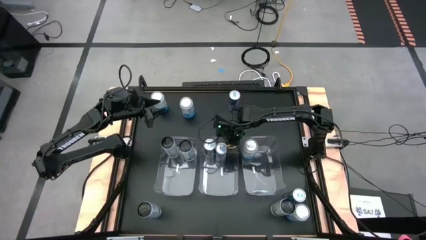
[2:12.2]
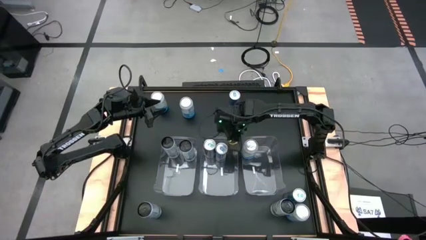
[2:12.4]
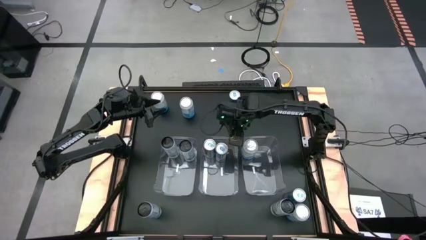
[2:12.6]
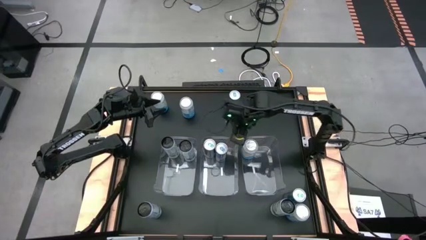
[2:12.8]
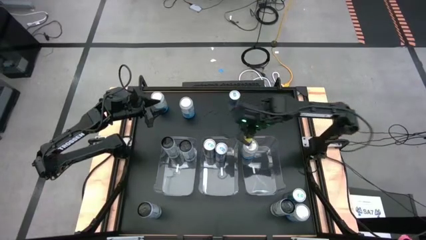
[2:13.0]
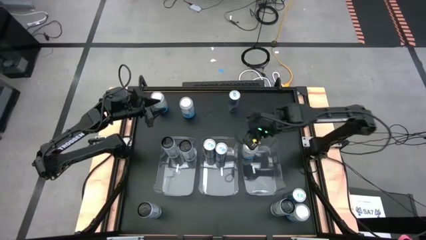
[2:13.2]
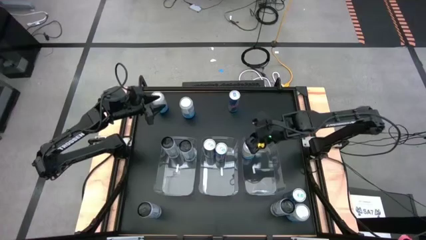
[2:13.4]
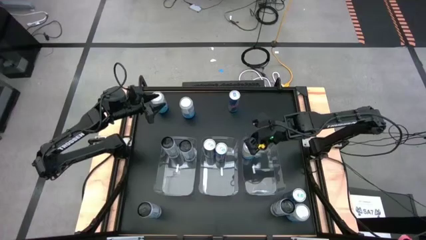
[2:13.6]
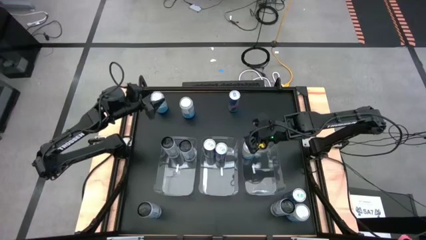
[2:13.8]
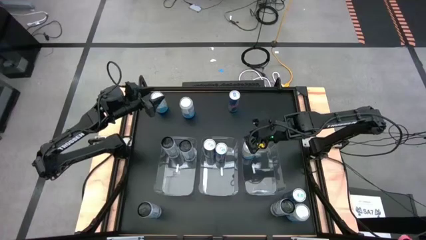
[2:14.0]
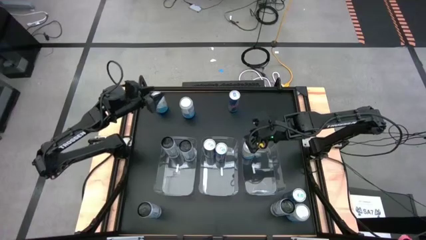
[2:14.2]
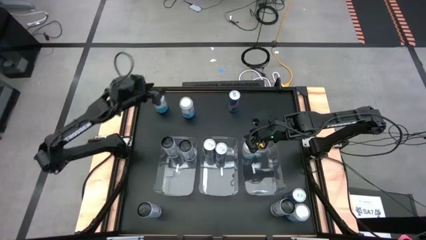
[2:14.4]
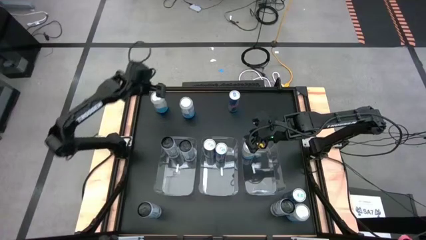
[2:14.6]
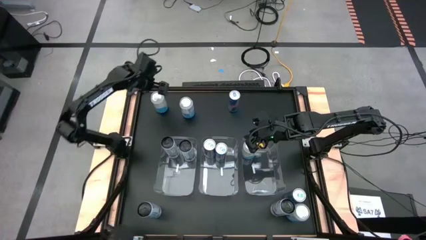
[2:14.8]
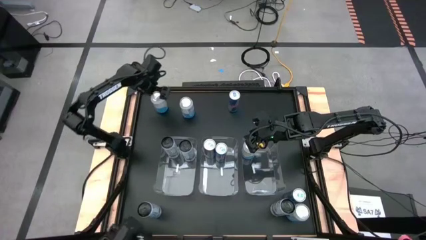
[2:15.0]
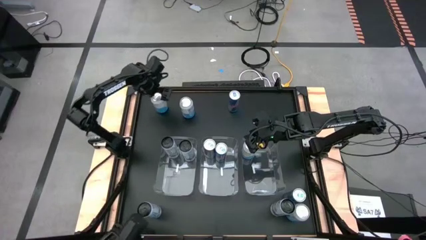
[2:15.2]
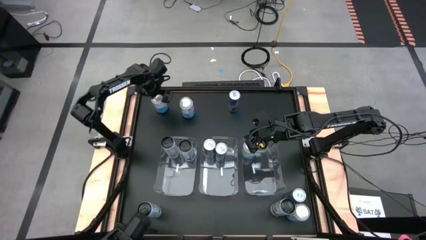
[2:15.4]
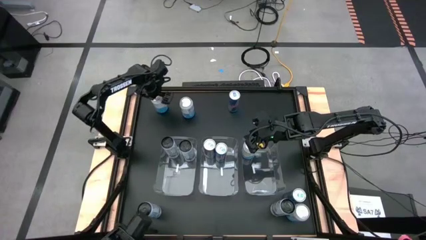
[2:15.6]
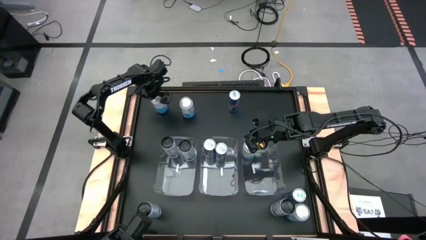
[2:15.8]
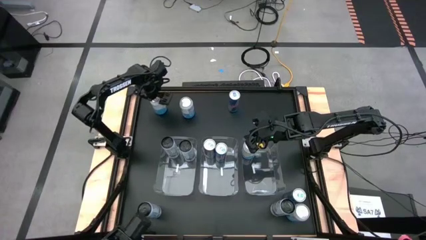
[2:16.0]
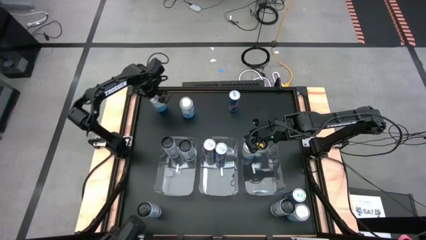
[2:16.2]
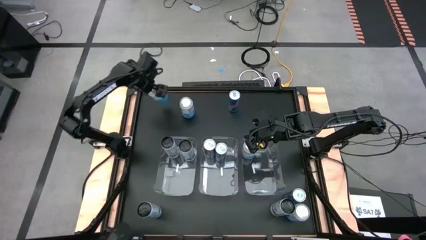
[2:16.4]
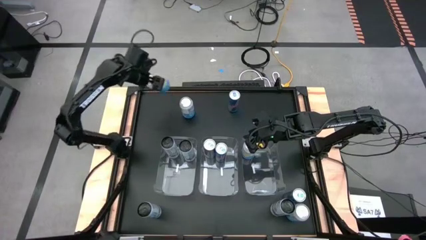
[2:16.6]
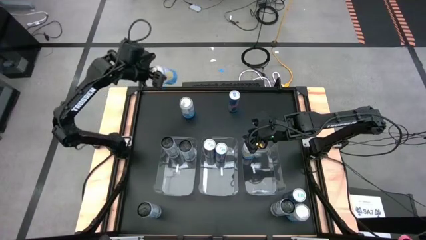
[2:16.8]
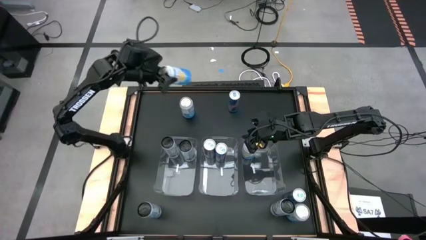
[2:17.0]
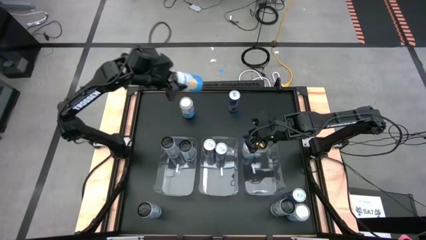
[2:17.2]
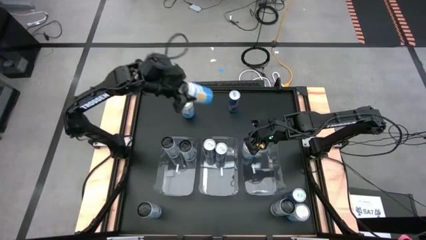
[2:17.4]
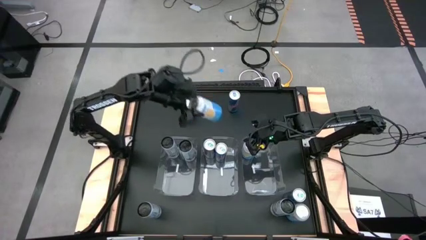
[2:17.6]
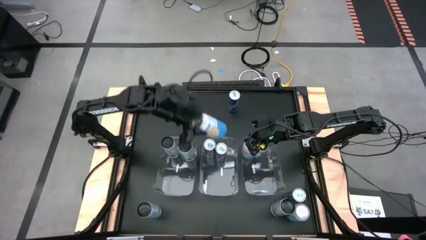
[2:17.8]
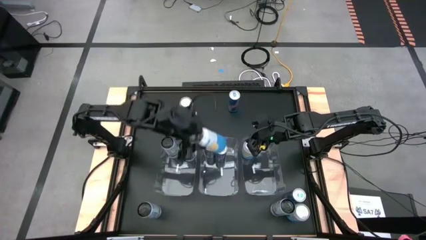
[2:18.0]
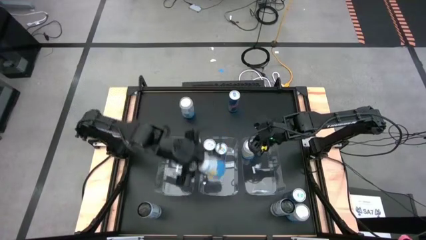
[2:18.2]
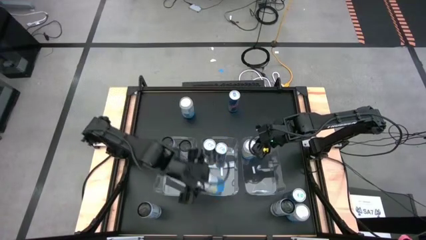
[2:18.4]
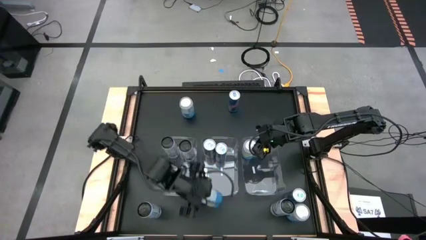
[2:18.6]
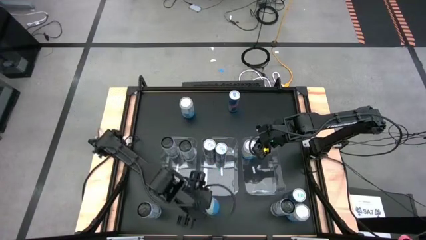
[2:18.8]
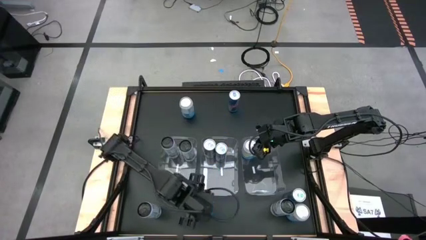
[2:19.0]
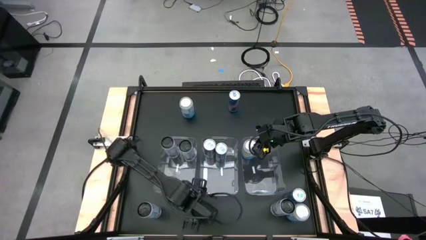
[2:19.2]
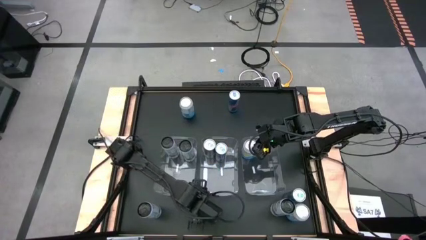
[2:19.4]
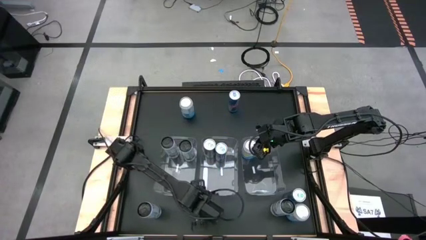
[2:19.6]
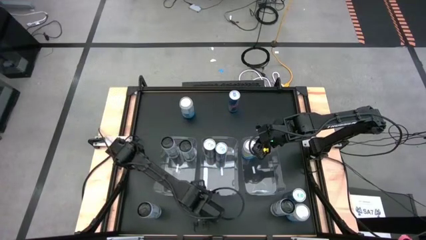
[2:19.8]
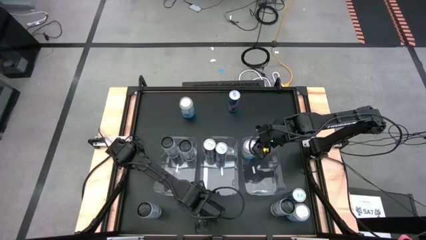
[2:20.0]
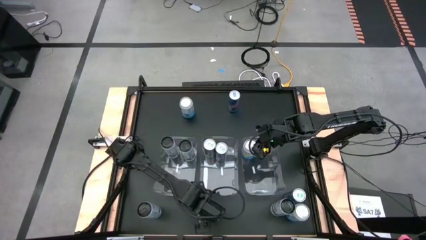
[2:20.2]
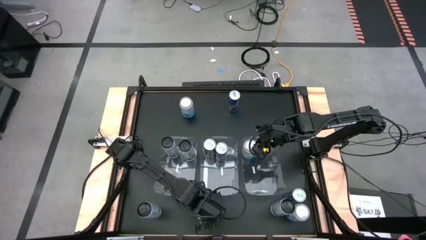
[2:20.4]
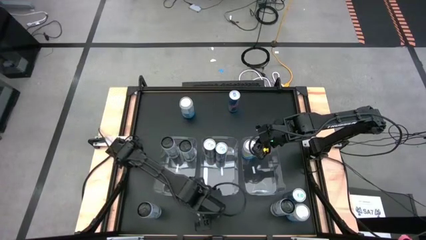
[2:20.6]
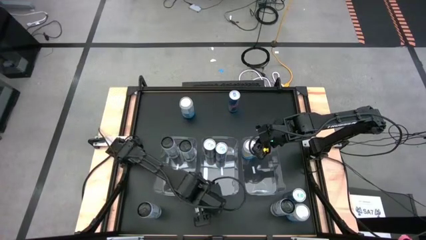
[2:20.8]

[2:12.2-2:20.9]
Task: Sort soda cans
Move the left white and blue soda can to the bottom of the table

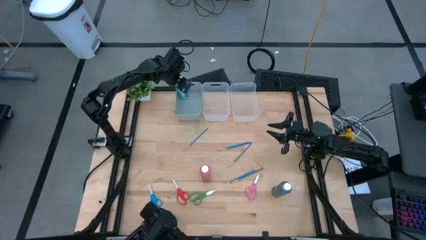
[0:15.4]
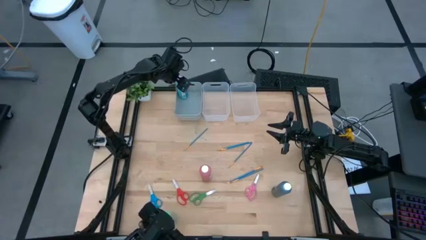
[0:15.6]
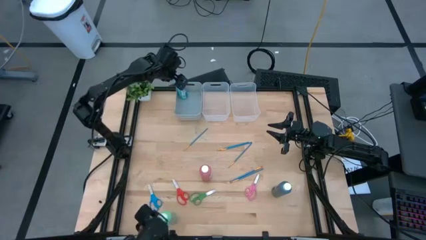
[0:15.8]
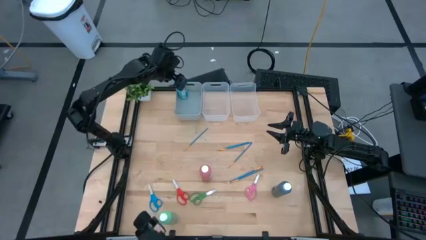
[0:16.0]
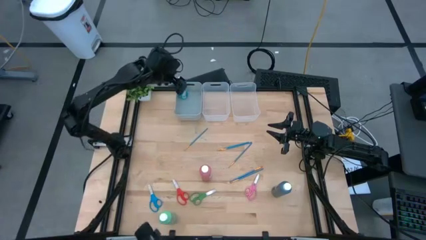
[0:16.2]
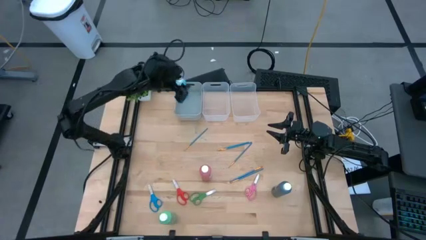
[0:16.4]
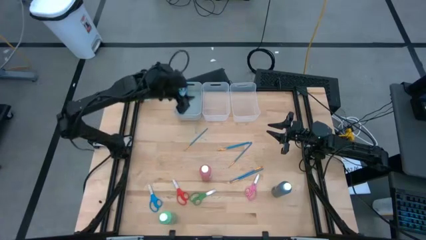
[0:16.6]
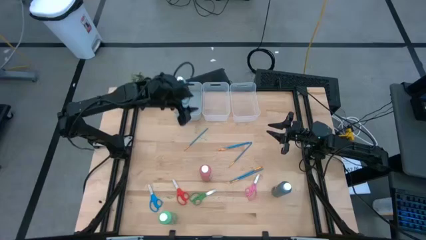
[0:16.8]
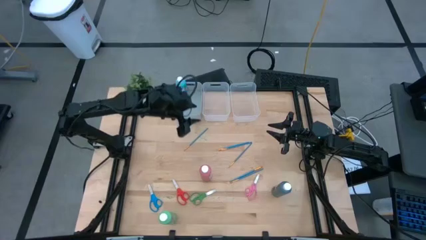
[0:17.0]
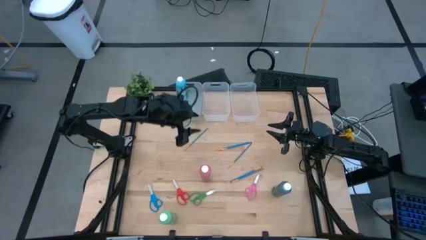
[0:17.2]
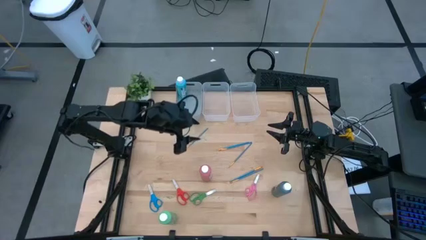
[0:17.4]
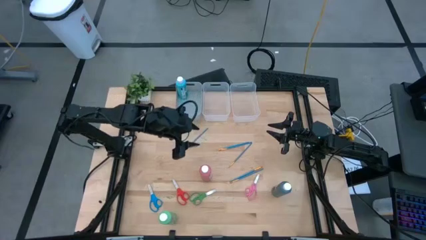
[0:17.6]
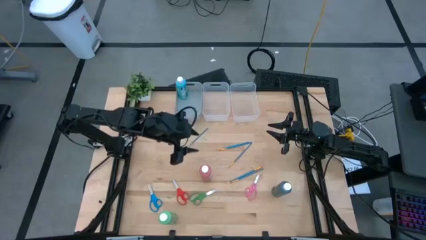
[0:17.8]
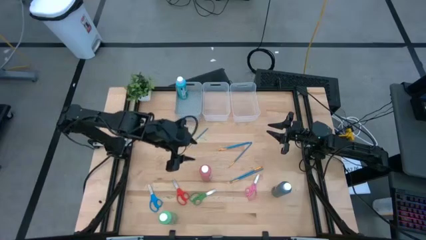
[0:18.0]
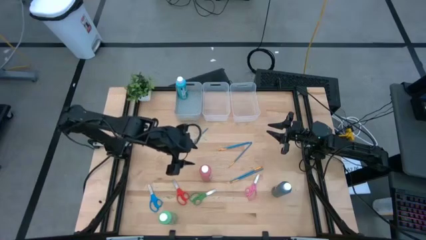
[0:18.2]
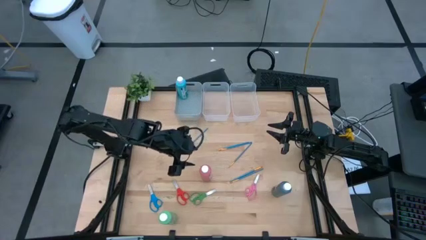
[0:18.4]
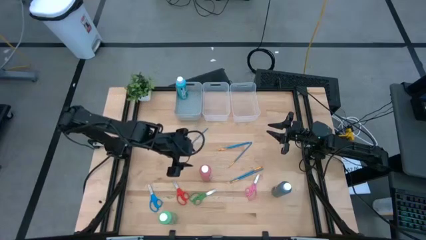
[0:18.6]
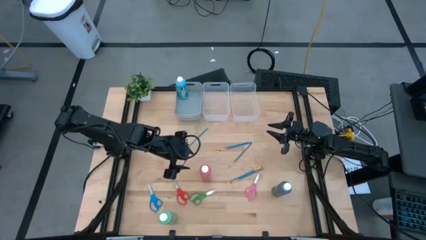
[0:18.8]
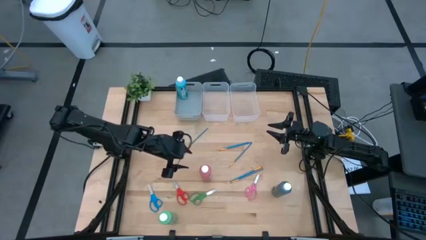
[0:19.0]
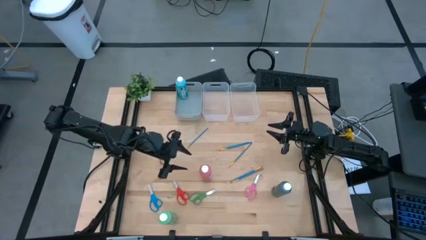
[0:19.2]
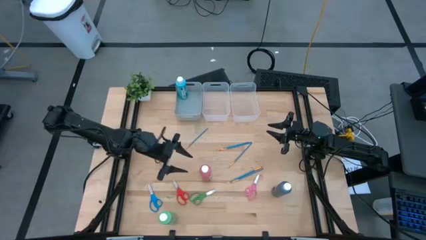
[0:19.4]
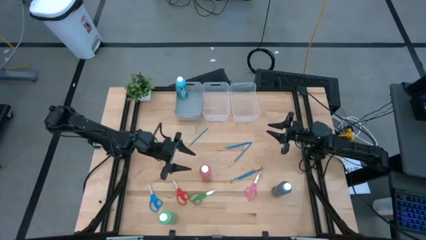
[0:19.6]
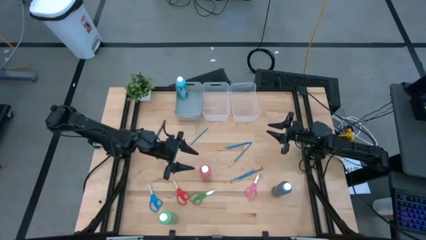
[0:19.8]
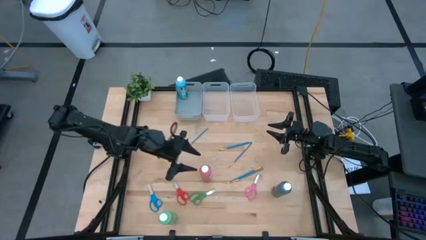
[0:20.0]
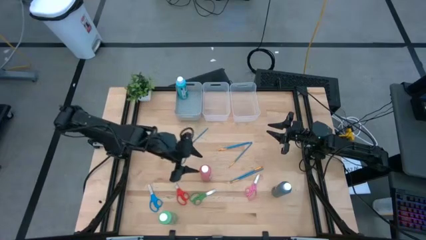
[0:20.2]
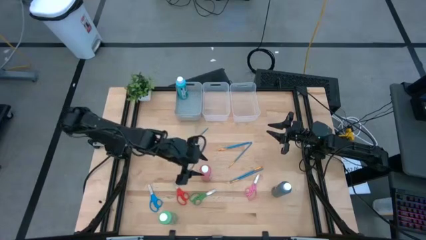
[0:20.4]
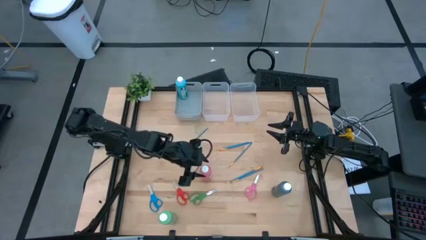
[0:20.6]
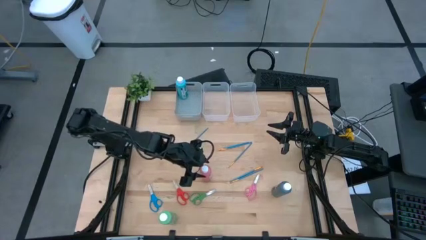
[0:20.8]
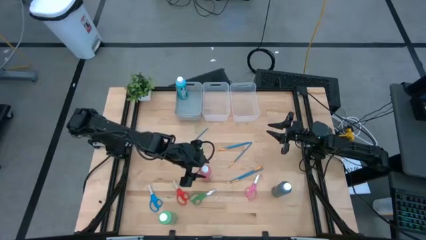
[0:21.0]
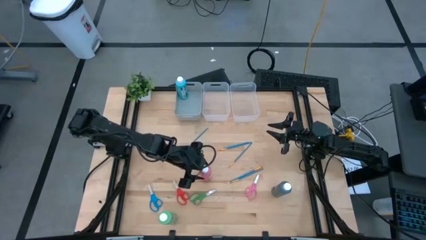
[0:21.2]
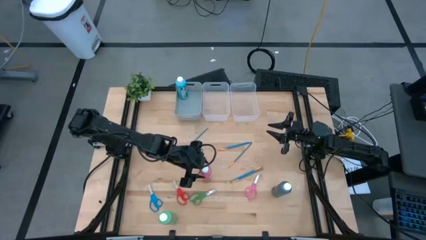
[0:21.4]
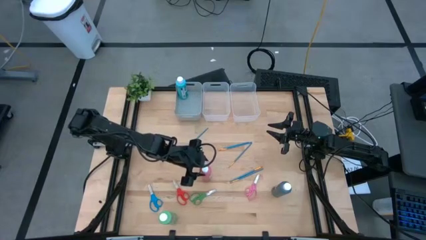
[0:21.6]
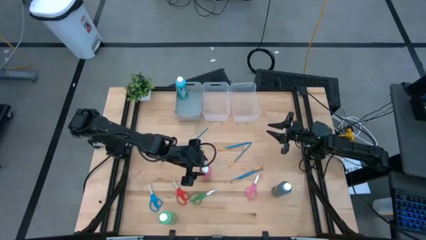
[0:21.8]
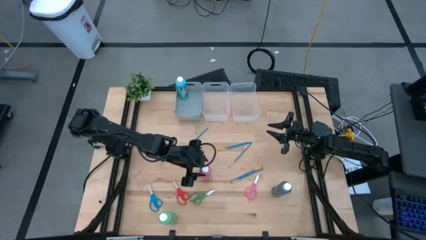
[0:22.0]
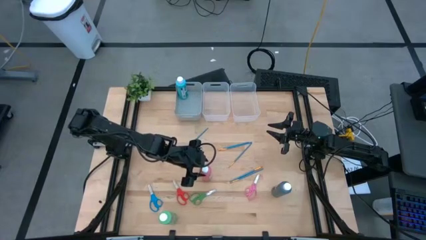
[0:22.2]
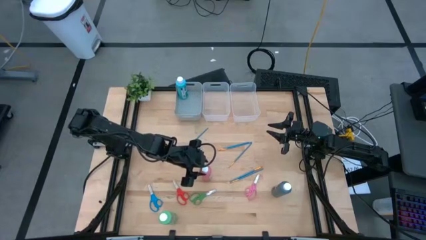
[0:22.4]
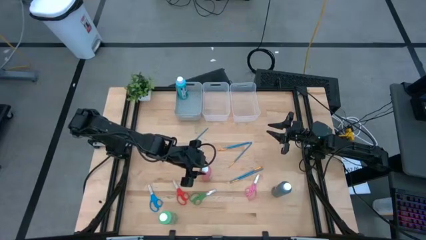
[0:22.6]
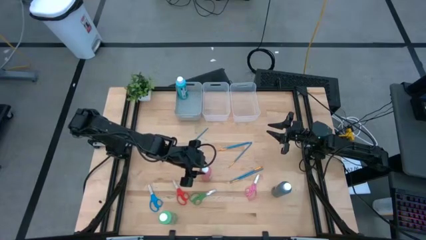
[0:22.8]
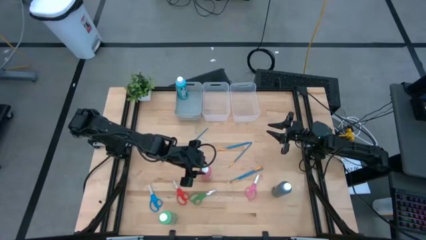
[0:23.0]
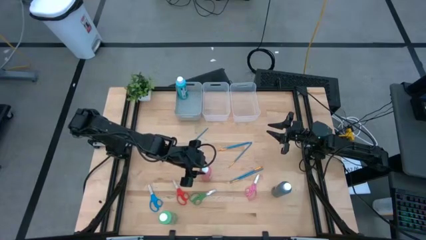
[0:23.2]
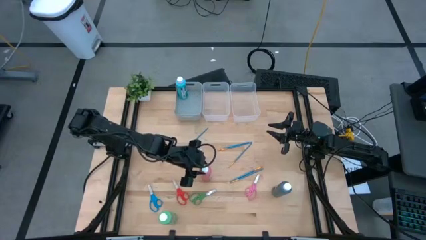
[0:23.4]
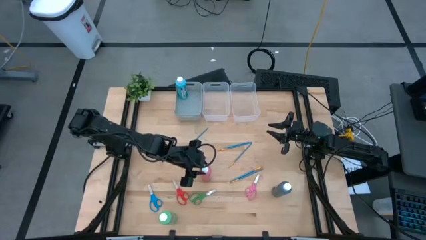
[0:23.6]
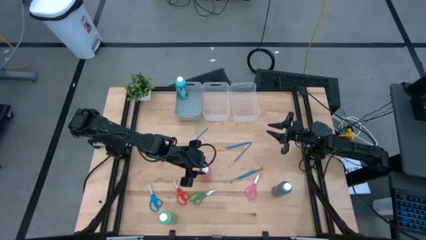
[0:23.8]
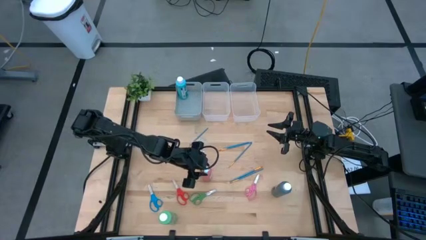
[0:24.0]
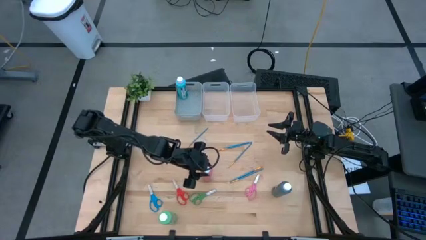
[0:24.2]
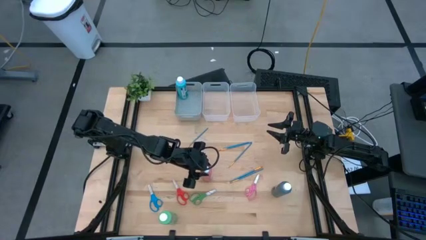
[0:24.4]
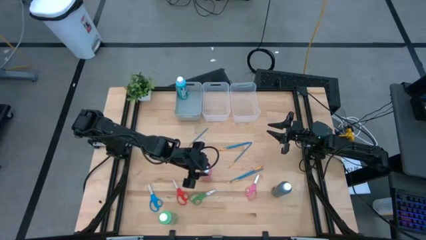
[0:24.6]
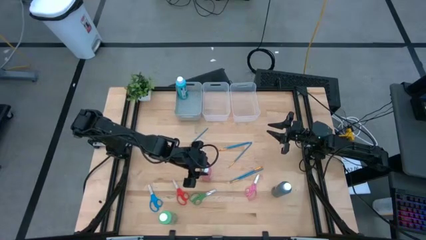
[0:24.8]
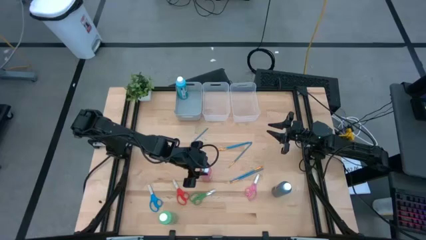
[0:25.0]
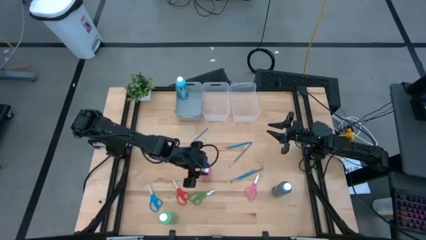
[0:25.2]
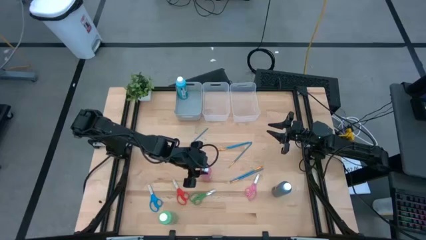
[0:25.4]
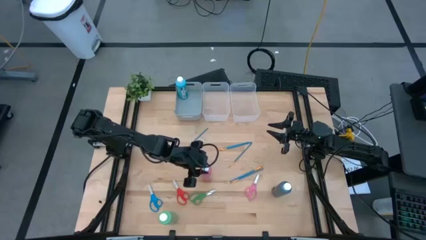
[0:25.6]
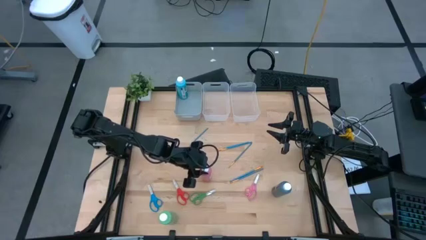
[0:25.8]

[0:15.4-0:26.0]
Task: Pick & Place Paint Supplies
Put the pink paint bottles into the gray bin
